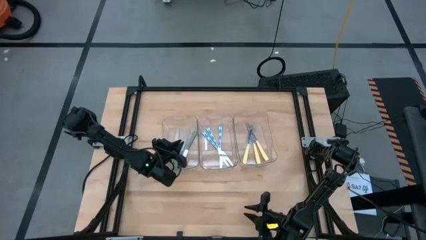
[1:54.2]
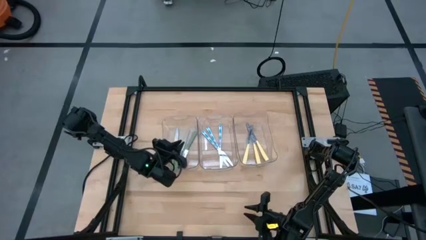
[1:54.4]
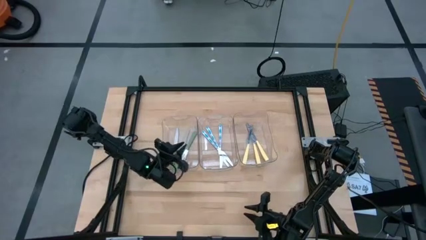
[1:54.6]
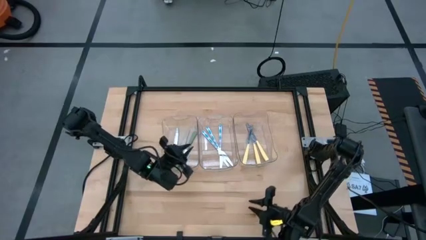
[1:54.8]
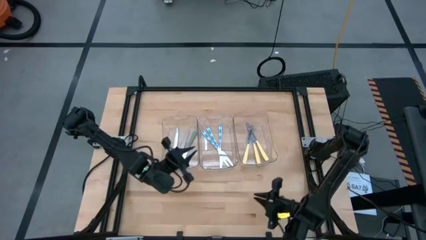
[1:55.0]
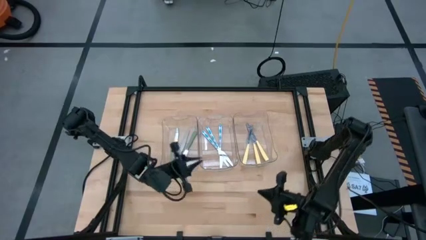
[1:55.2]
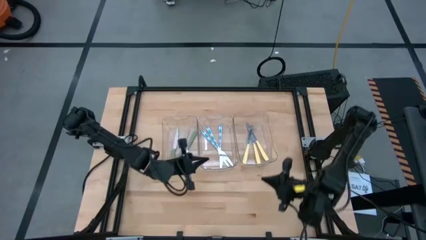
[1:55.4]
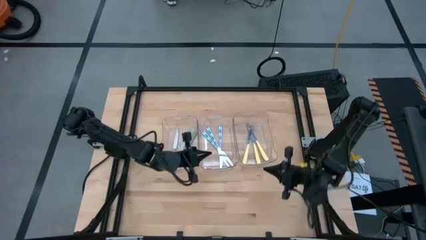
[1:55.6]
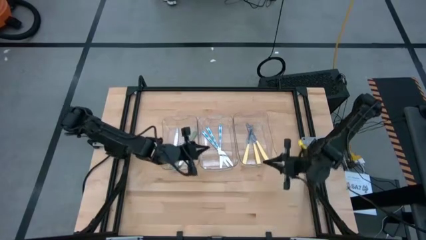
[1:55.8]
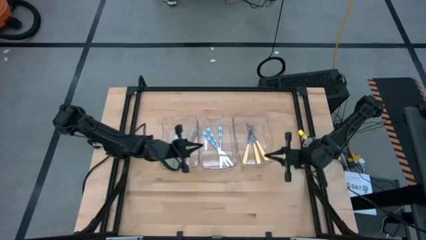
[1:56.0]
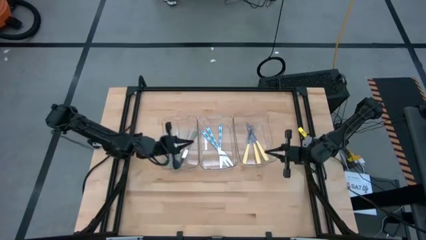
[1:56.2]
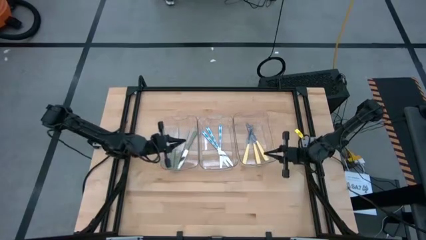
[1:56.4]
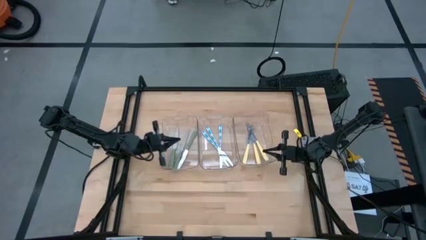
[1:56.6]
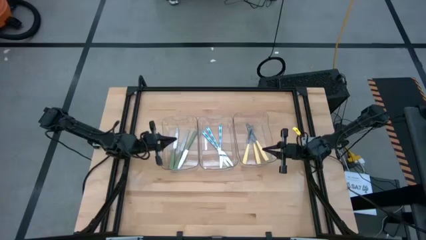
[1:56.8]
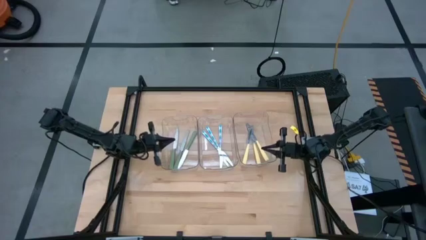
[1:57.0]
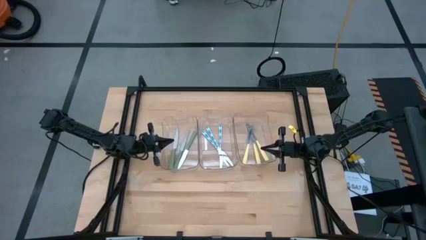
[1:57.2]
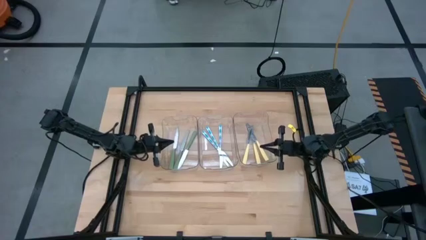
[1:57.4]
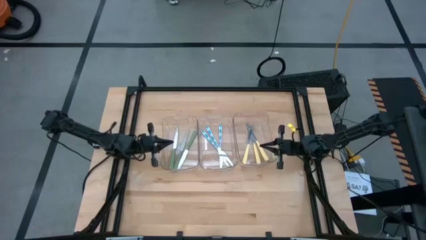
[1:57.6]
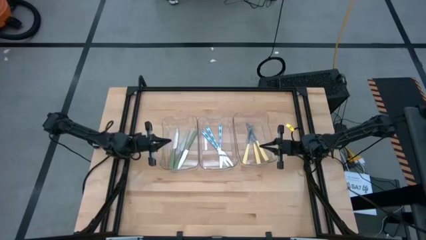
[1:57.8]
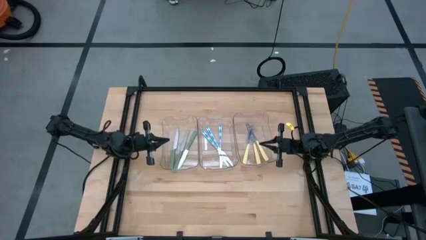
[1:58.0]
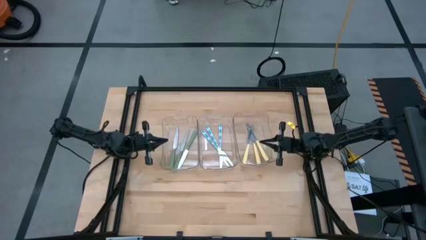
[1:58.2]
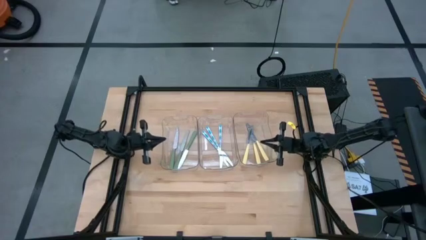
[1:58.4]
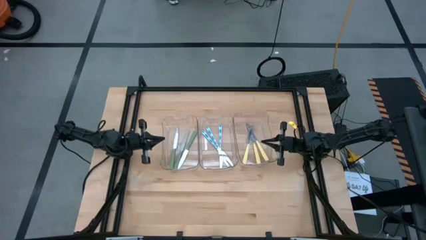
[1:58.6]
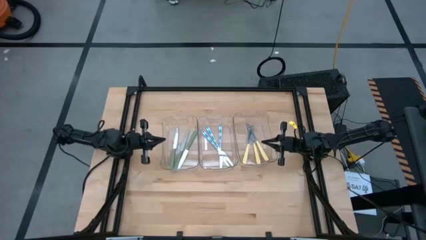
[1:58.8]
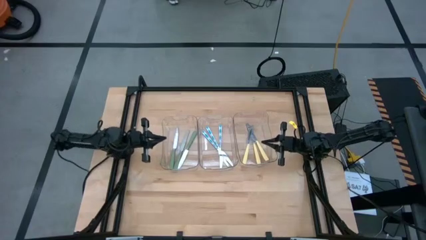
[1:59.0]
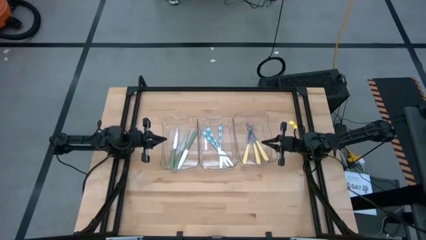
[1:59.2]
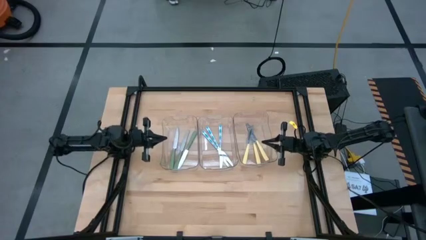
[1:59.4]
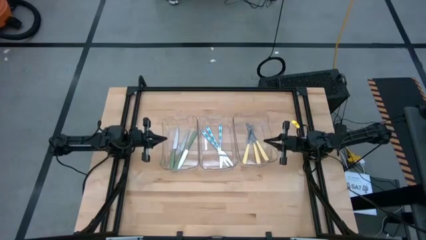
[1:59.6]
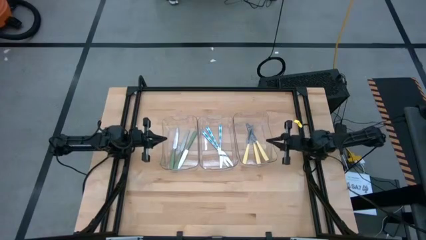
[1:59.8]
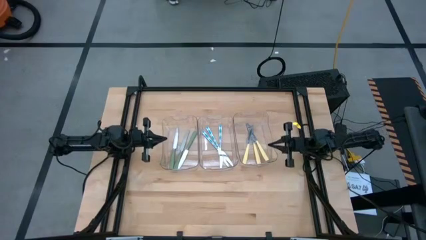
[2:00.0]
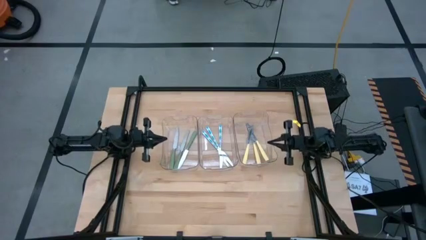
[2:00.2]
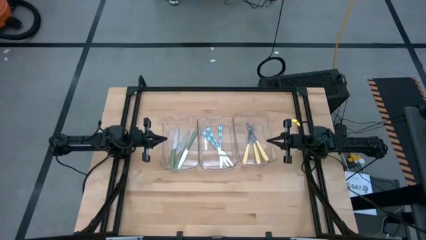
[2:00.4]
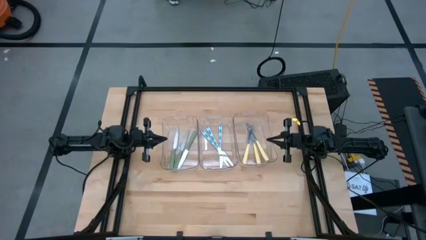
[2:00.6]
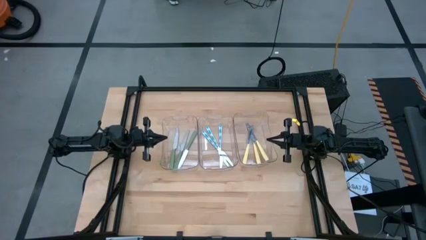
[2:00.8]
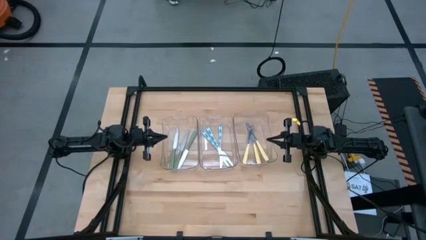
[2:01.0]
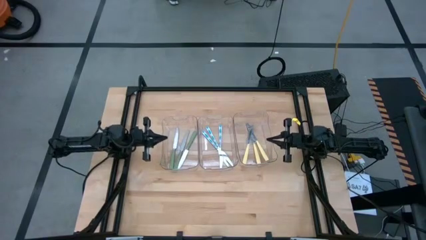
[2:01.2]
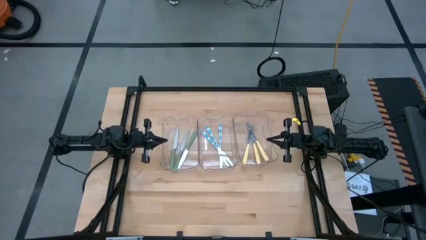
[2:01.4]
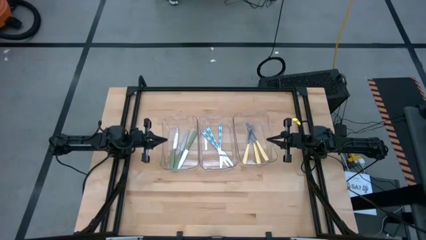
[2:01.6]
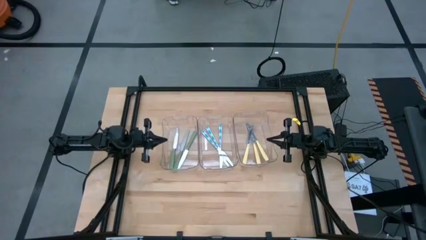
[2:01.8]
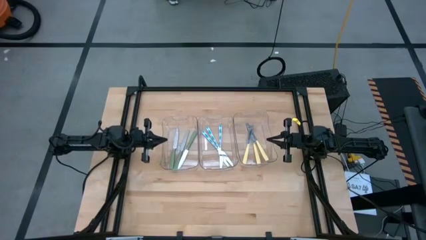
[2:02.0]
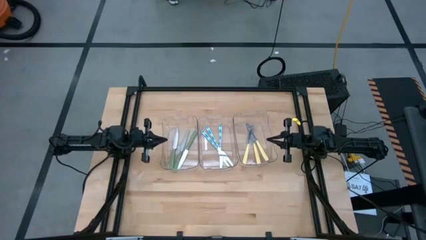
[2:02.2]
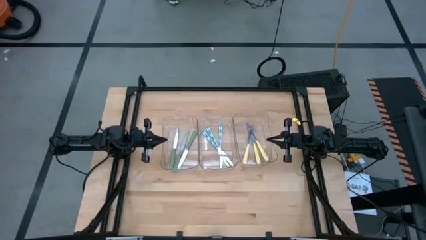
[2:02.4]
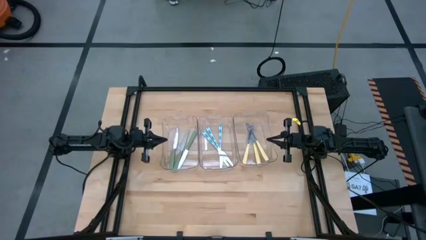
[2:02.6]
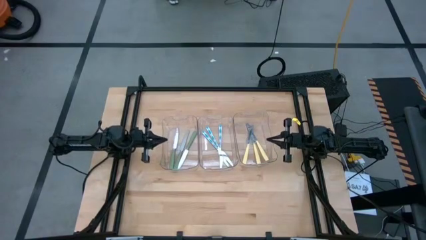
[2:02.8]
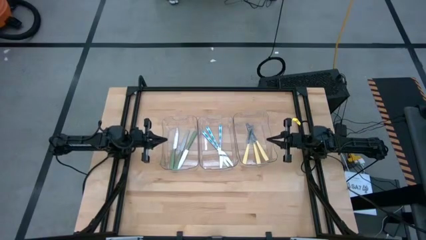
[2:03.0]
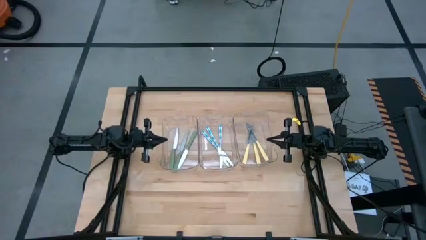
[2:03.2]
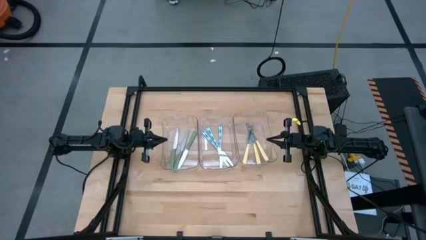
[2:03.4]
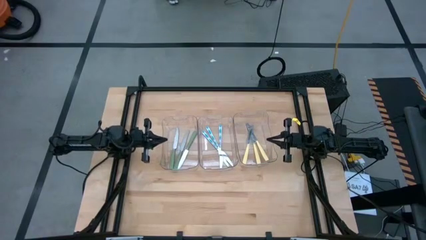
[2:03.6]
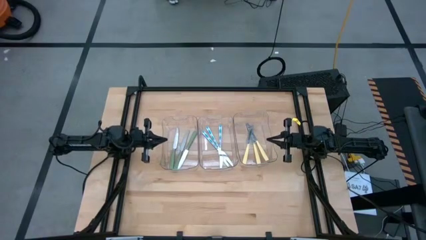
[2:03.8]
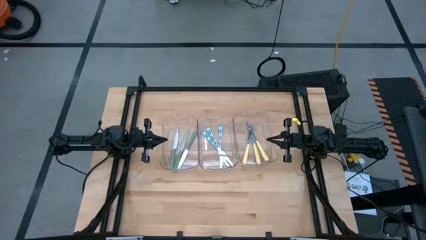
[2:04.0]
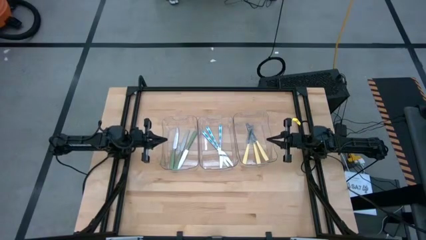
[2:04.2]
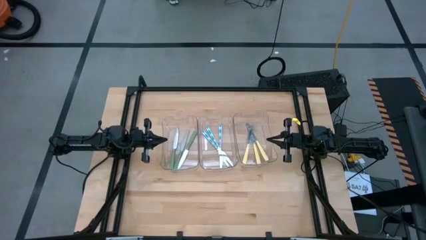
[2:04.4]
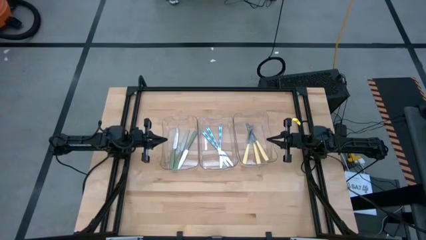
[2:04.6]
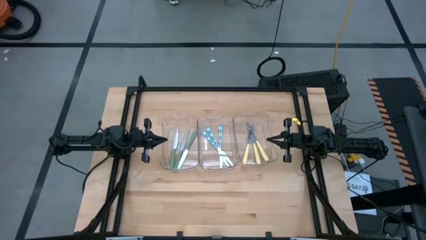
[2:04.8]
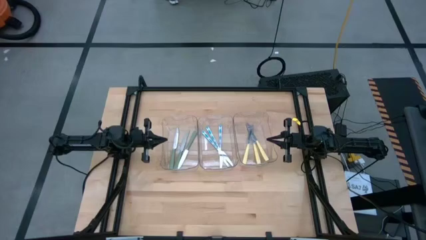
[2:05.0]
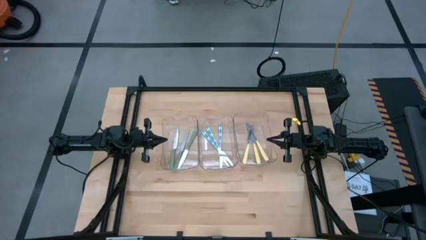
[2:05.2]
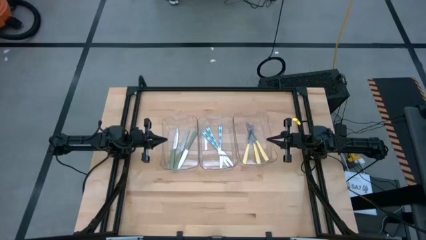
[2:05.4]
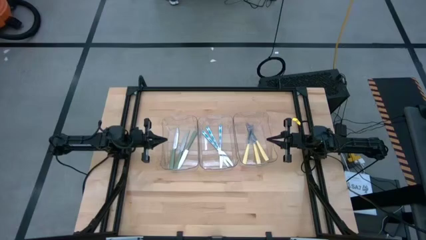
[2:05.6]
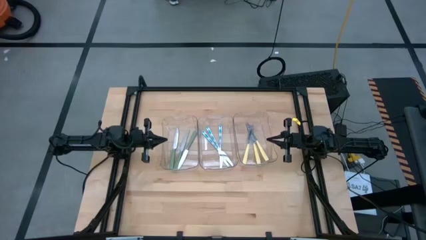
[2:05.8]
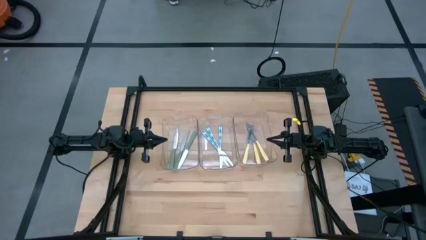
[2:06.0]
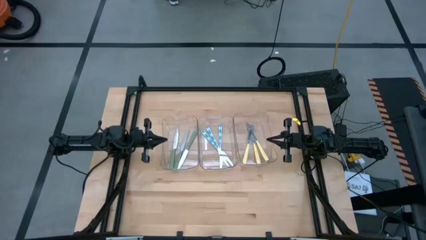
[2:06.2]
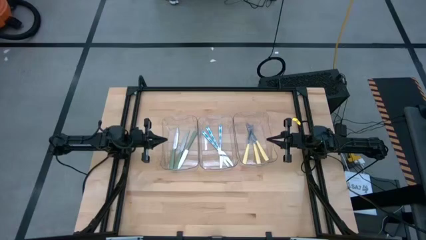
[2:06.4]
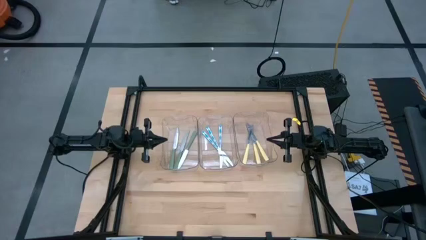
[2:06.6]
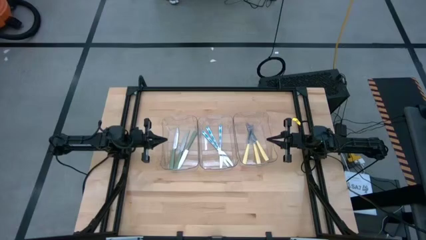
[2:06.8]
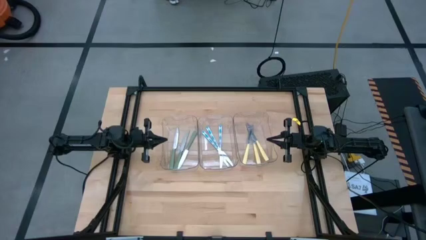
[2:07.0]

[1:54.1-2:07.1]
Task: Sort silverware by color (type)
Return to Home Position

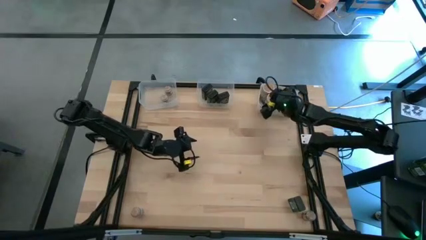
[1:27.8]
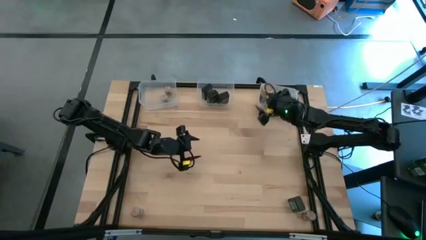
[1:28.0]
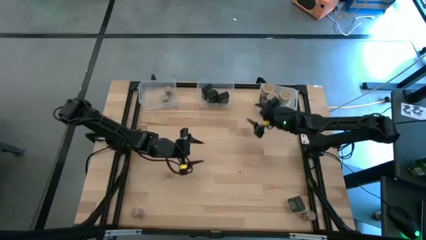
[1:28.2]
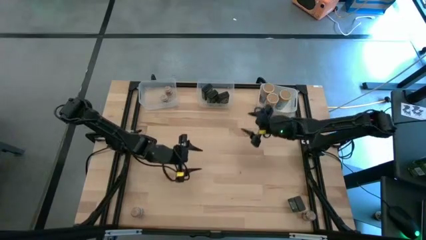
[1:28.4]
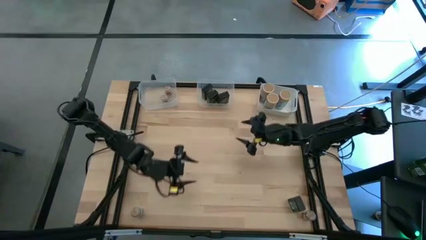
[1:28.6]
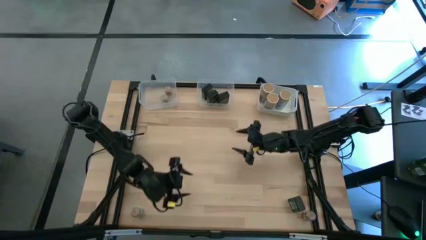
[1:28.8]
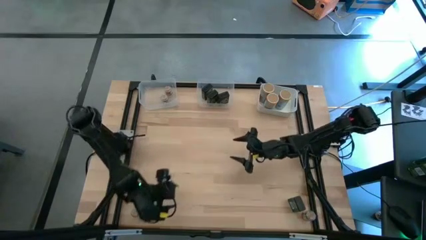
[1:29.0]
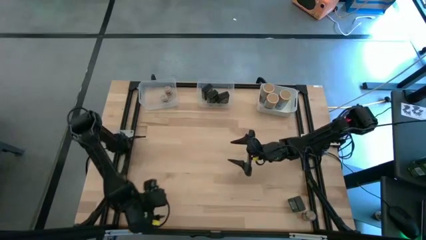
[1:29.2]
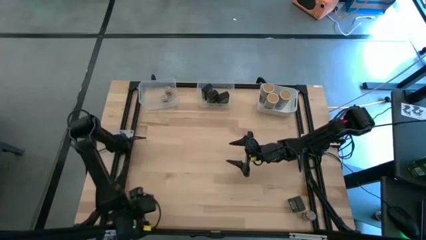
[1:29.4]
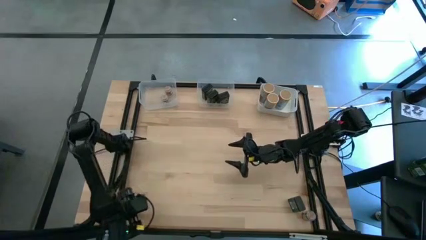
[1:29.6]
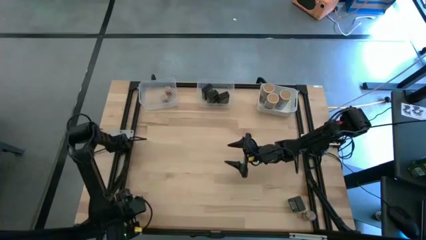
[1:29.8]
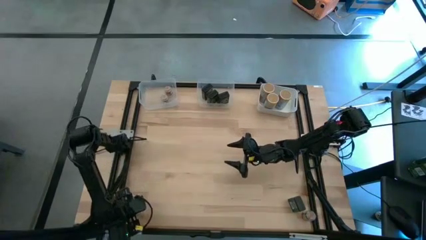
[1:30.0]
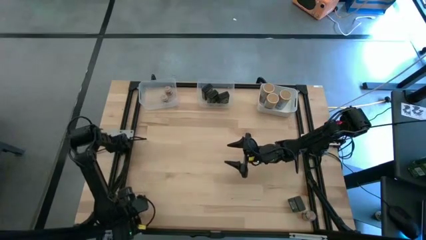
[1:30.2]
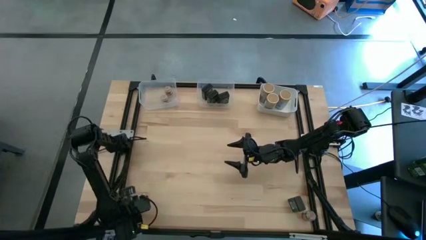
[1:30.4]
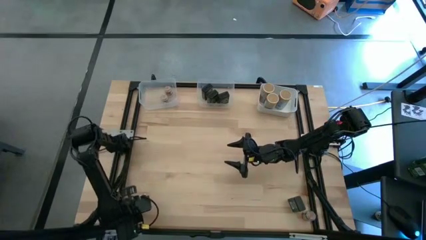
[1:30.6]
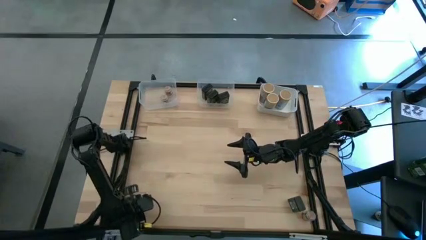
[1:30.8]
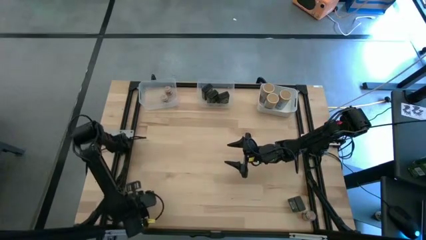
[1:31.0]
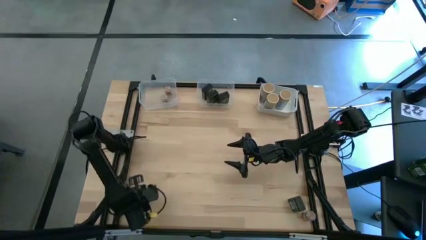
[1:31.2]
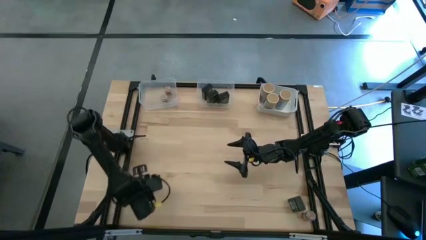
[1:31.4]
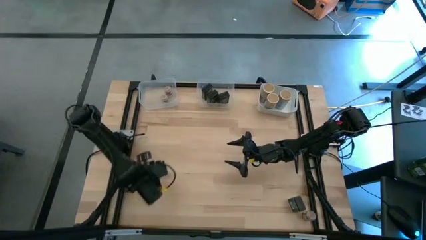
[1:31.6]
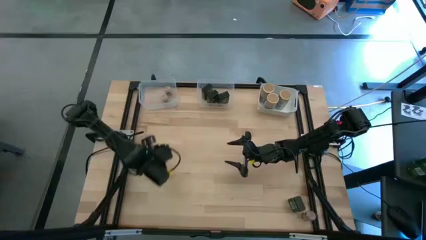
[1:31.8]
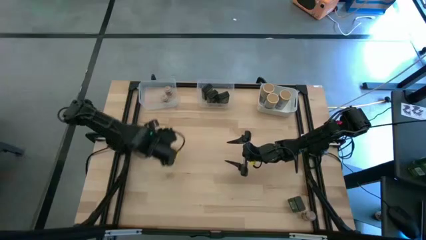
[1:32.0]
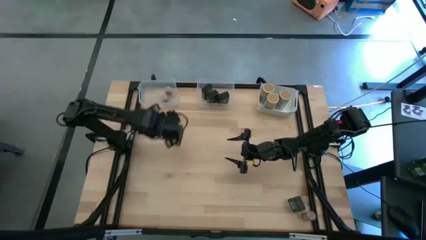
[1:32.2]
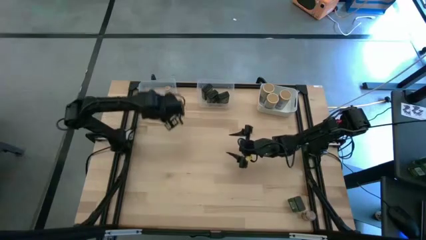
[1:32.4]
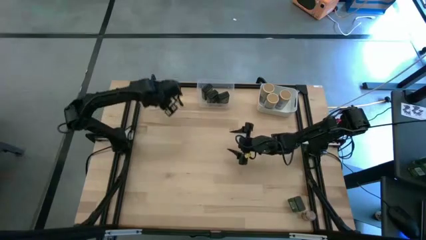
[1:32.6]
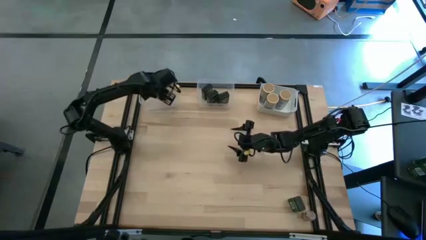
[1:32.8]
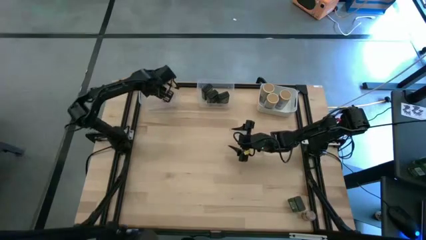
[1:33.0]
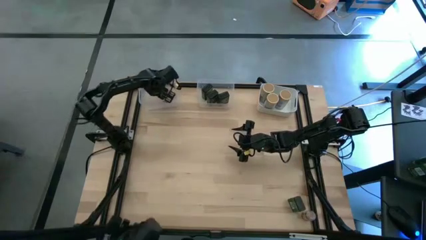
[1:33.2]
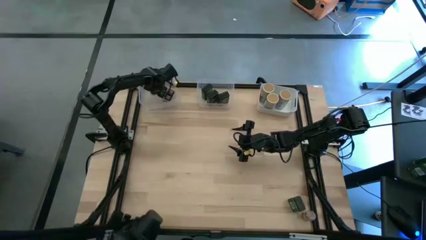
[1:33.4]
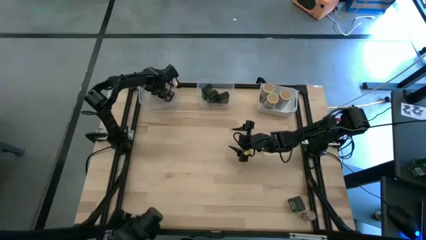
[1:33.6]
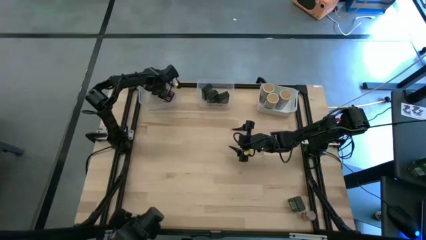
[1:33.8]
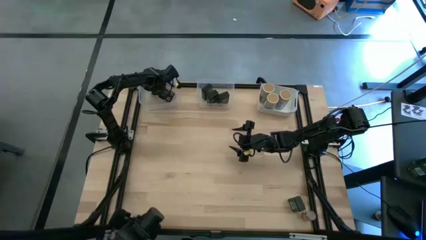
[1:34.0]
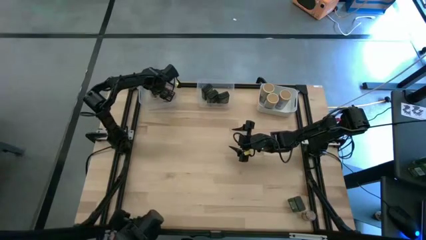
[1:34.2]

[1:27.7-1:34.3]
Task: Sort spices by type
Put the left brown seasoning bottle into the left transparent bin
